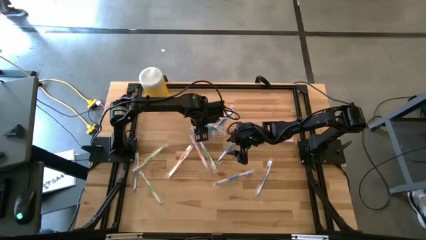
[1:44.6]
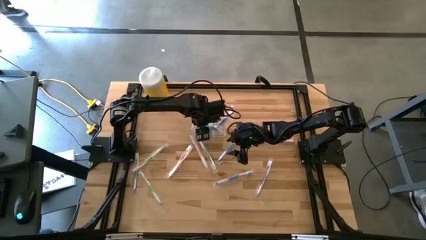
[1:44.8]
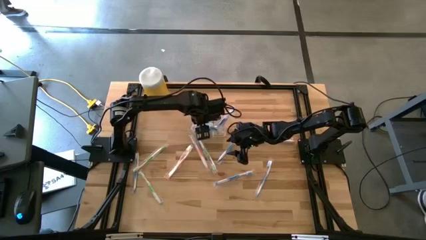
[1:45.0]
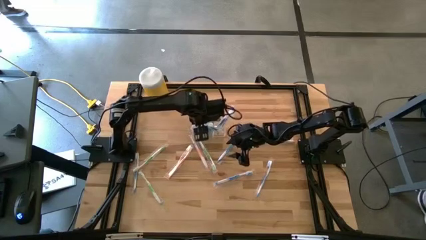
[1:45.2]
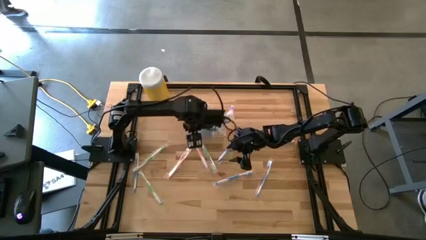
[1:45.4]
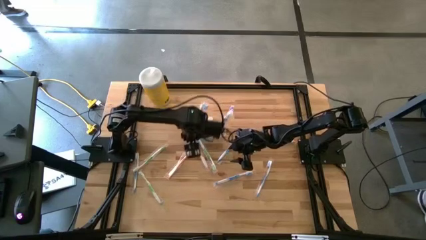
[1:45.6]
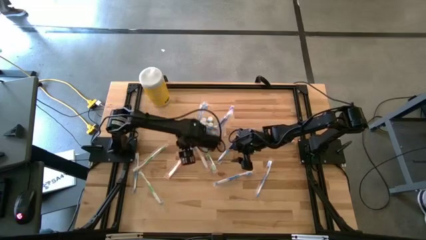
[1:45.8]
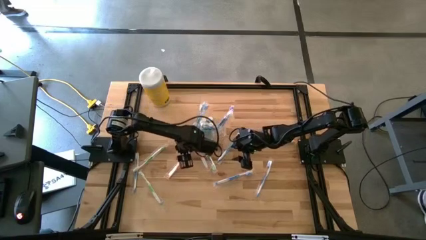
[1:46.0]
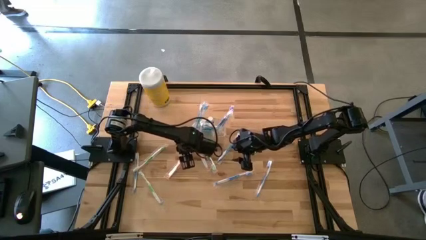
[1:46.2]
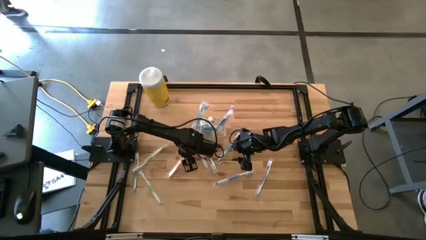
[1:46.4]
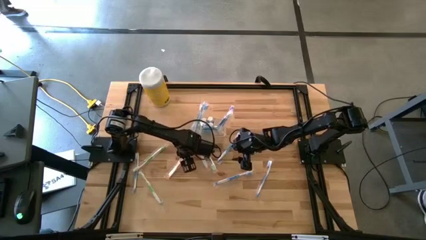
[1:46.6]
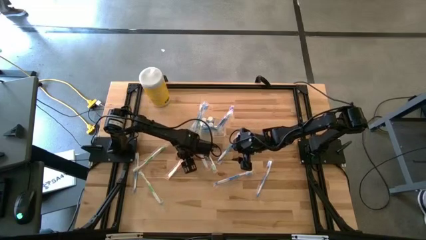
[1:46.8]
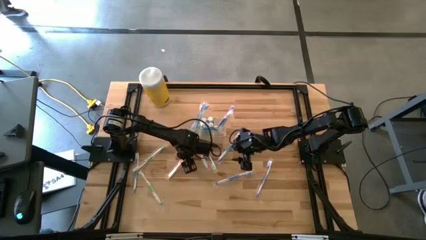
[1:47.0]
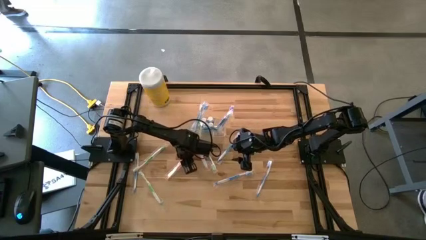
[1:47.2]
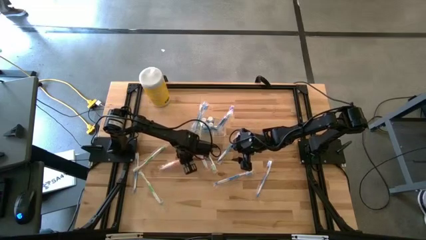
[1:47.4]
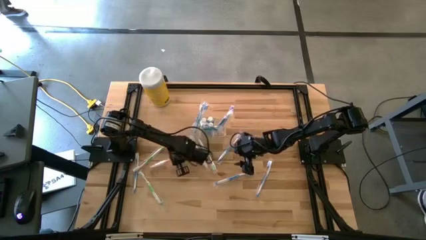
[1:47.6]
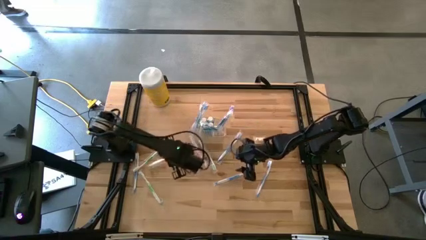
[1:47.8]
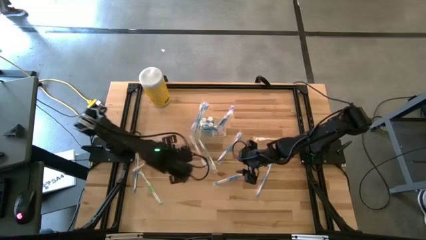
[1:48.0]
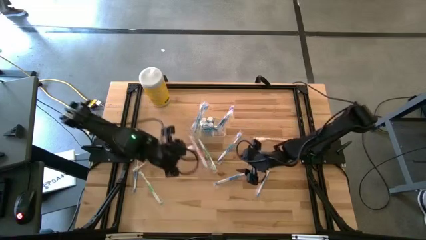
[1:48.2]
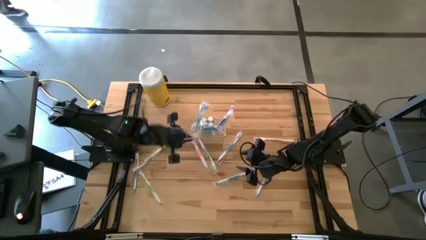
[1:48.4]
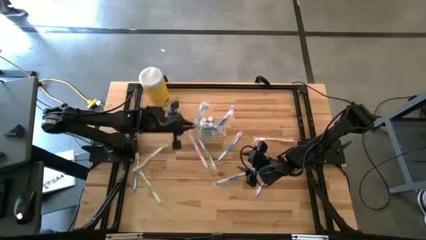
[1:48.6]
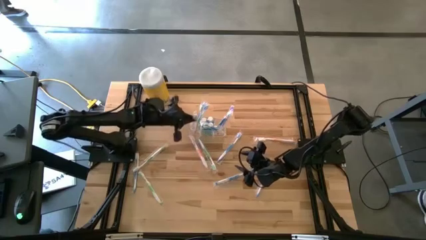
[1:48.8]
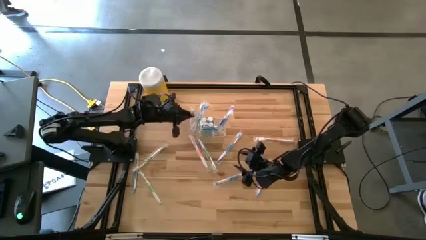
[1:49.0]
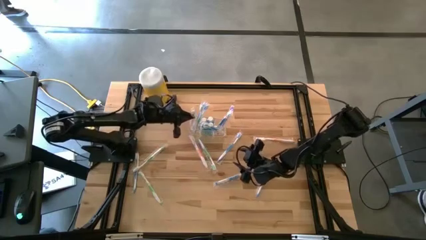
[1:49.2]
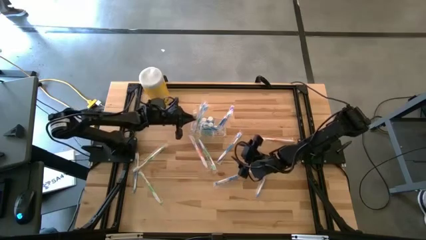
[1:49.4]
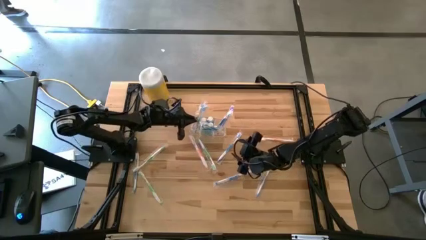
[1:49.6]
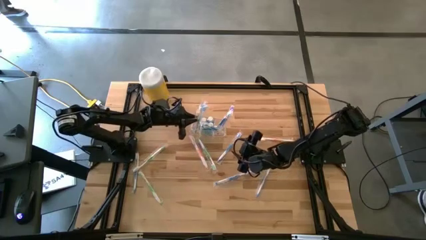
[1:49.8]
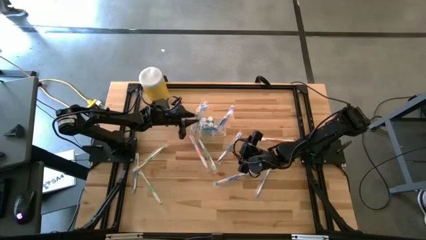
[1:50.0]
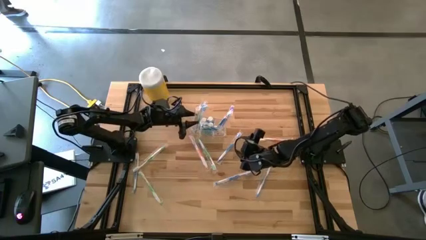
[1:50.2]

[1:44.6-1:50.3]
Task: Pick & Place toothbrushing station
Put the orange toothbrush into the transparent organizer

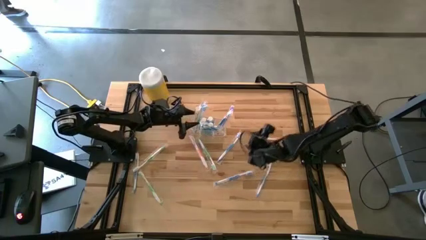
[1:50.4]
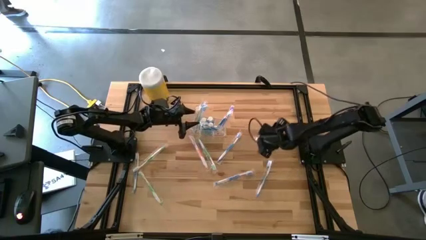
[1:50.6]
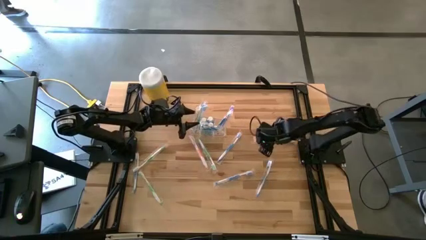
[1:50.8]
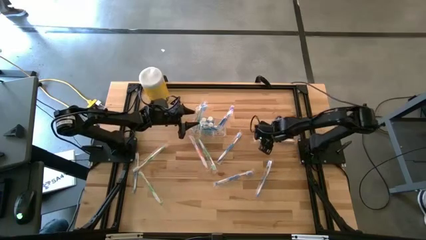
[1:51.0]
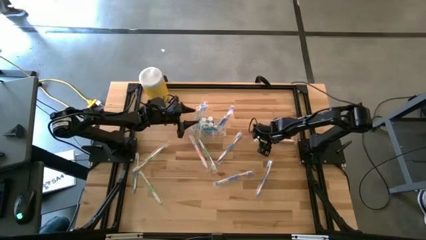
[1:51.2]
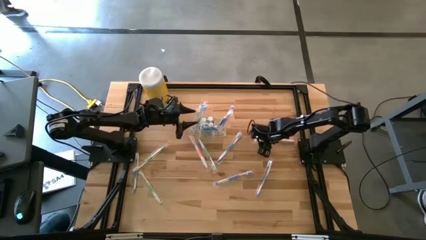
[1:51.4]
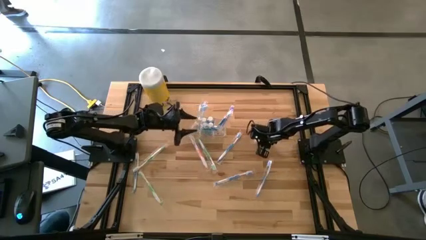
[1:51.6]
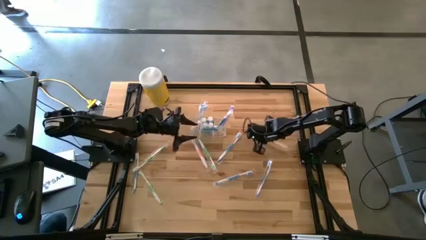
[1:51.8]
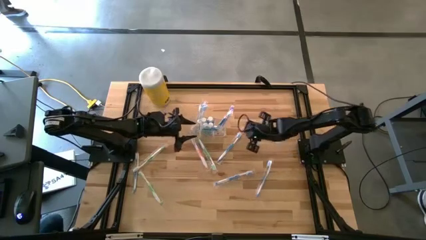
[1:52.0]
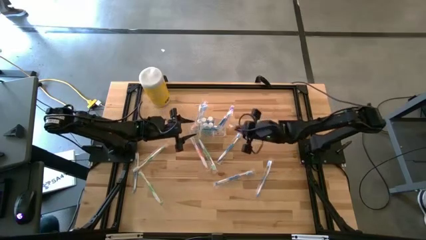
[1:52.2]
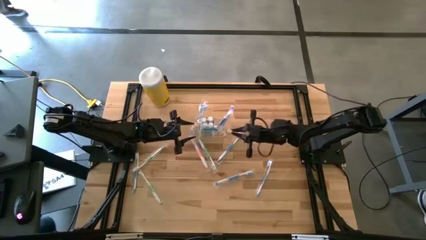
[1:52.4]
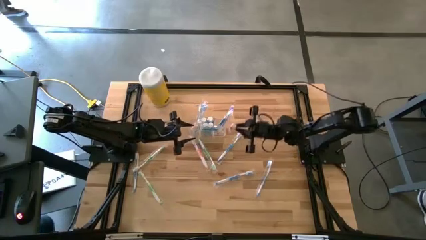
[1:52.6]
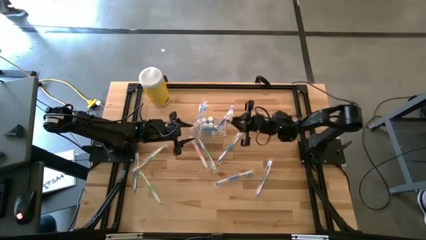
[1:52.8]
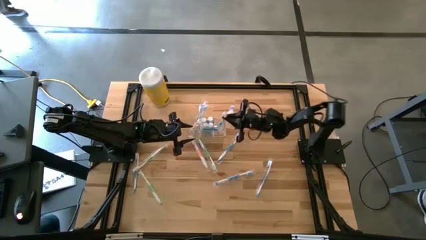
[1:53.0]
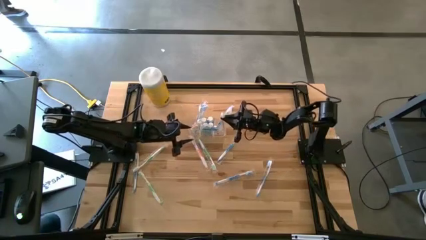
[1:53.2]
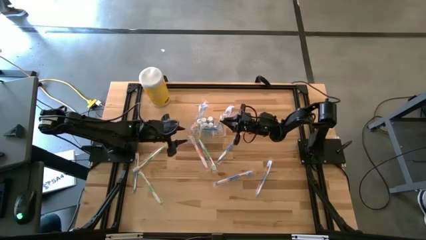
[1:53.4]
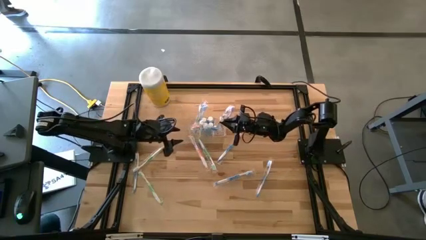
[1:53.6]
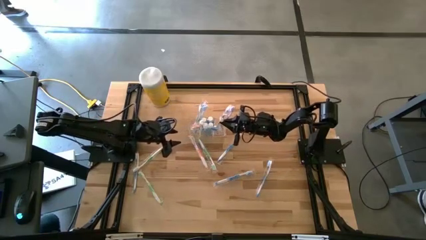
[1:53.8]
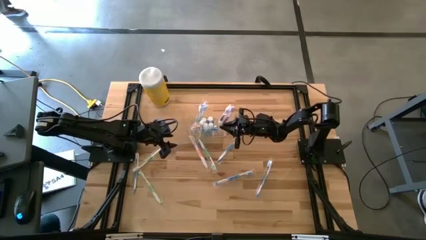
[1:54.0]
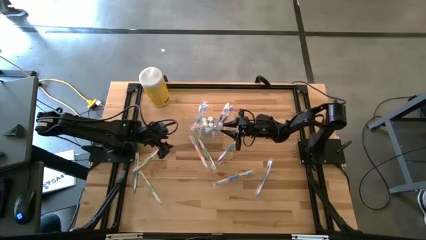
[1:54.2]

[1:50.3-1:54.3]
Put the orange toothbrush into the transparent organizer

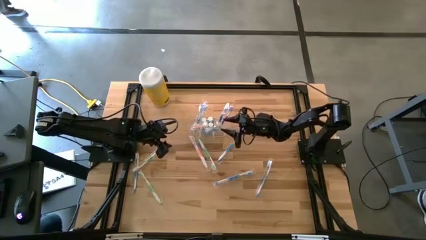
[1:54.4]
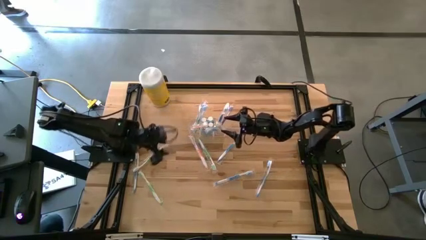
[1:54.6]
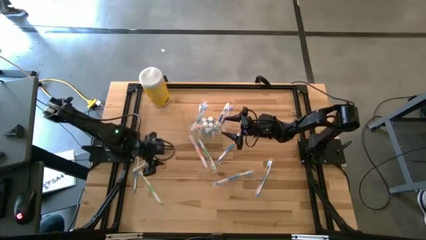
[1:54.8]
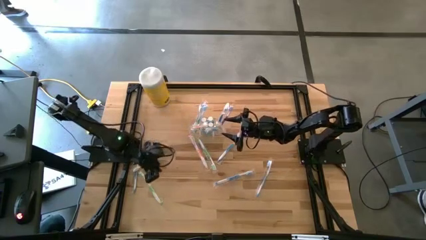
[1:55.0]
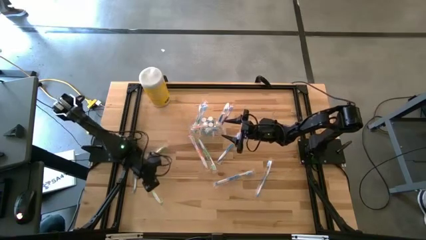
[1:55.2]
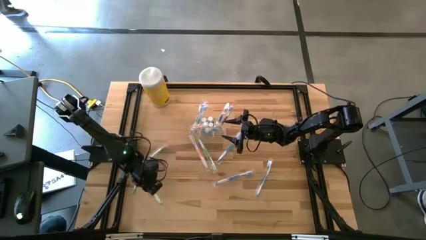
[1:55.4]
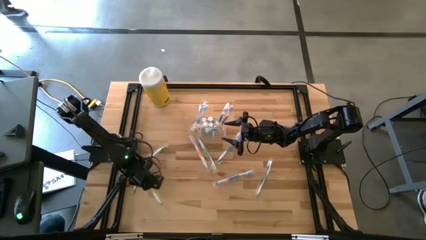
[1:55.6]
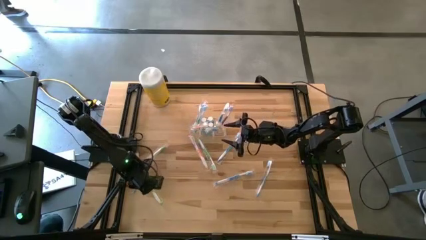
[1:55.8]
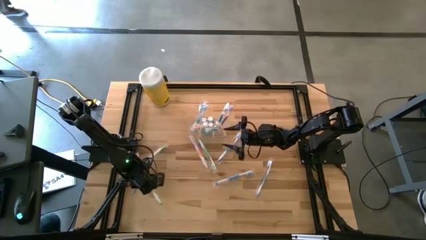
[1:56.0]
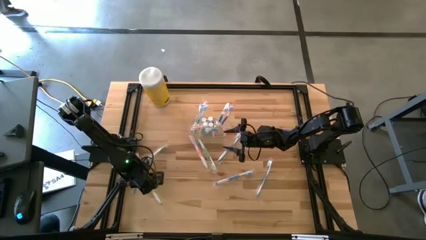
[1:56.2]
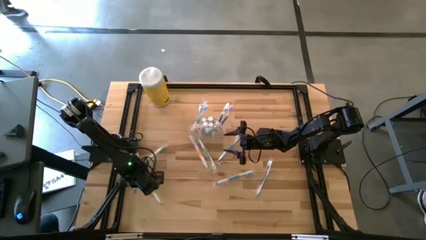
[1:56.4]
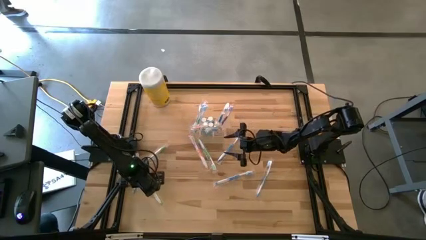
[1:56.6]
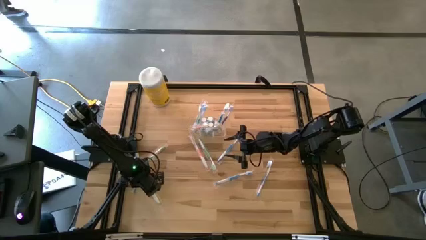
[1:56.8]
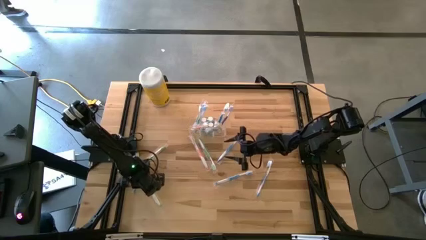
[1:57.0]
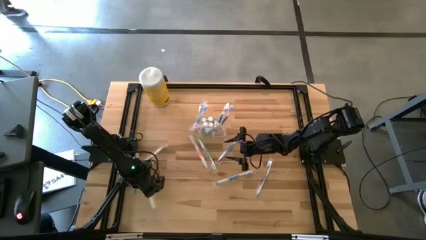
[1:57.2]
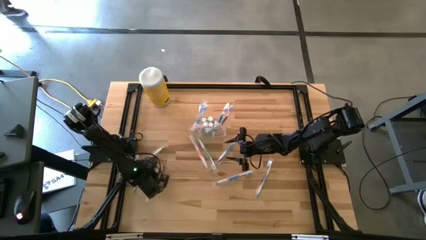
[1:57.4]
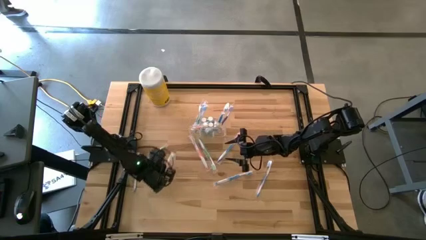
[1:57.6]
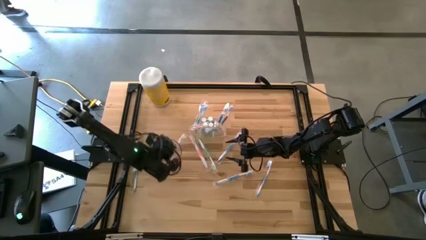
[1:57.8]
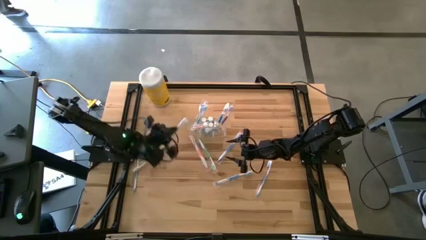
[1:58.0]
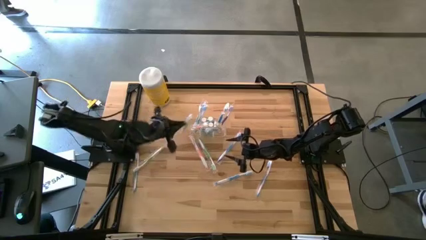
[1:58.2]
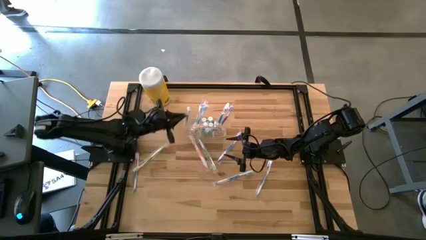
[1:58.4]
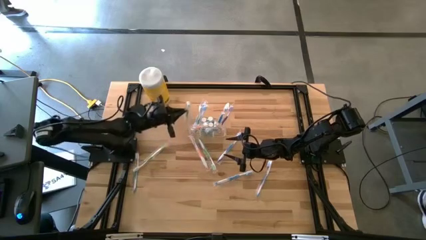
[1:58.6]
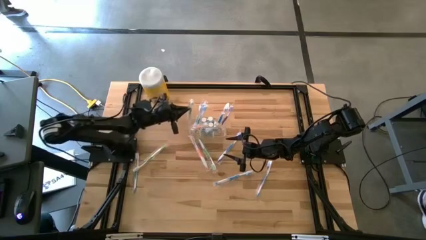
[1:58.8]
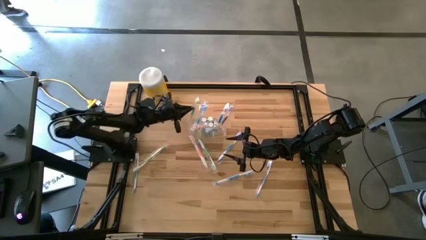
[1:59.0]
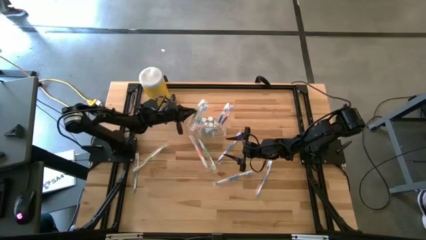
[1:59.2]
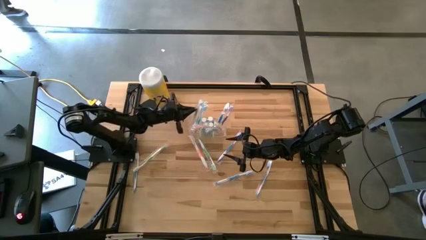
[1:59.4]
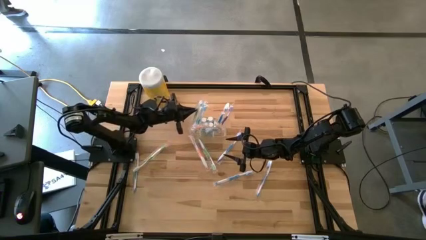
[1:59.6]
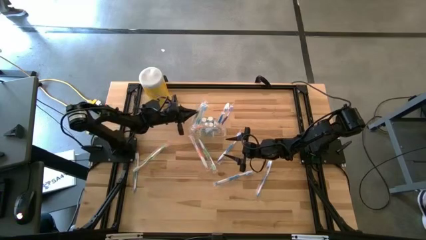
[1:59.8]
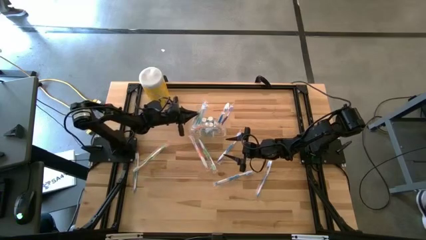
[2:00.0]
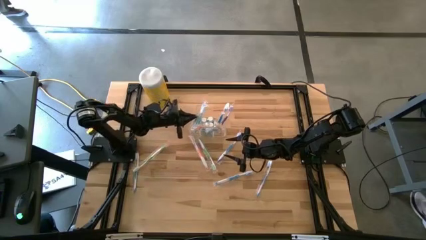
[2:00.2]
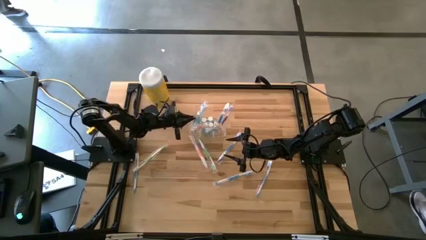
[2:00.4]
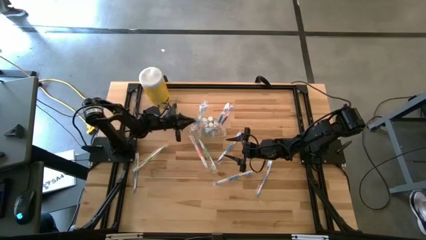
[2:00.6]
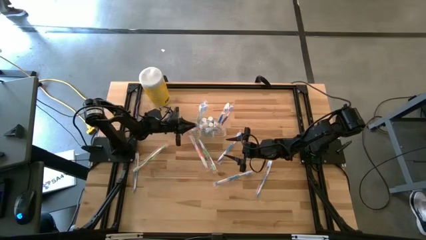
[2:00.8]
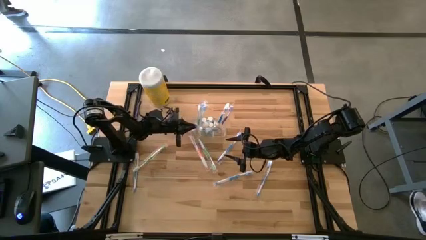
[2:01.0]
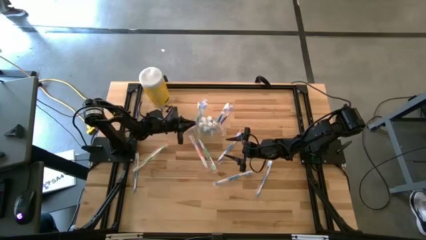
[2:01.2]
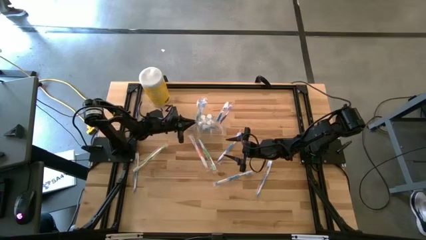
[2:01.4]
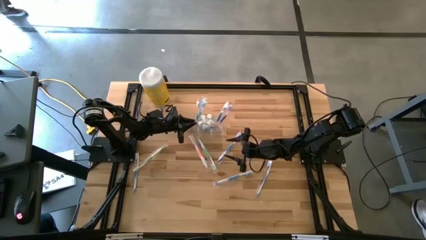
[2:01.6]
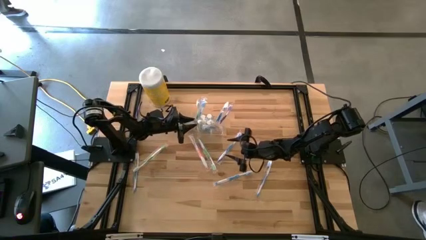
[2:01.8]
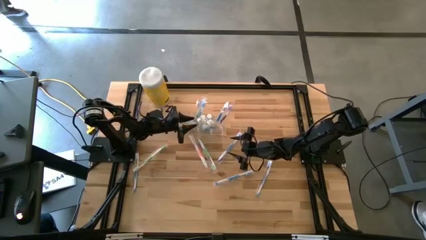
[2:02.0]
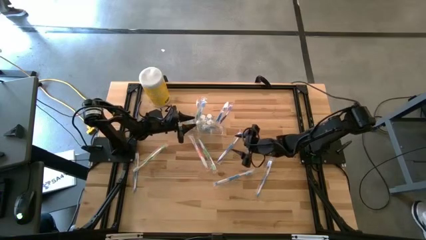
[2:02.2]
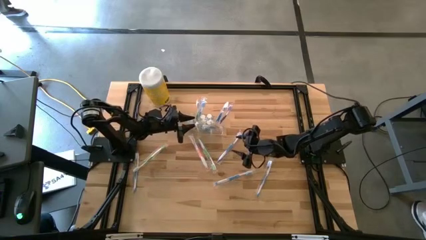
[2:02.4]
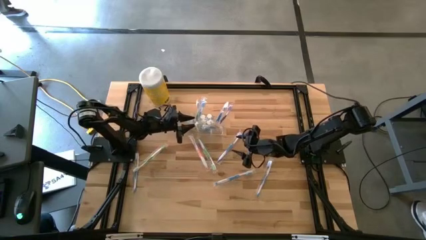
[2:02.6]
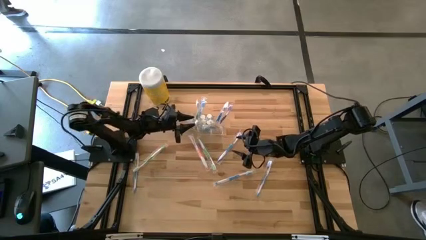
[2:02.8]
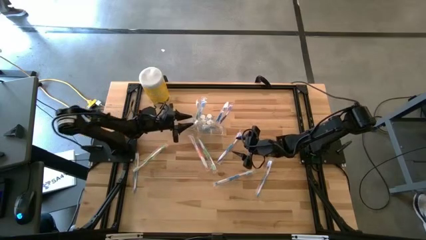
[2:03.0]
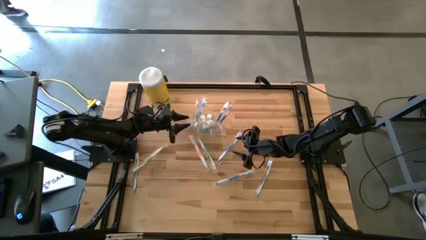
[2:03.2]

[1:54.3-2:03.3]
Put the green toothbrush into the transparent organizer
